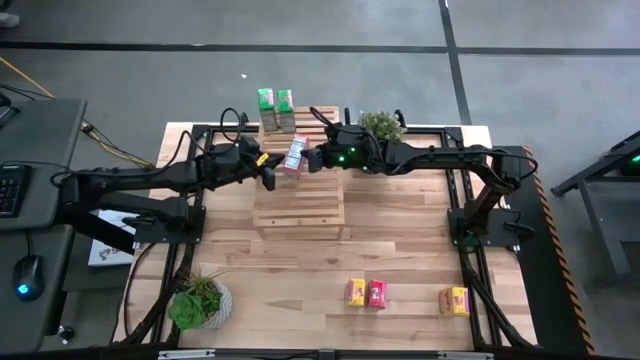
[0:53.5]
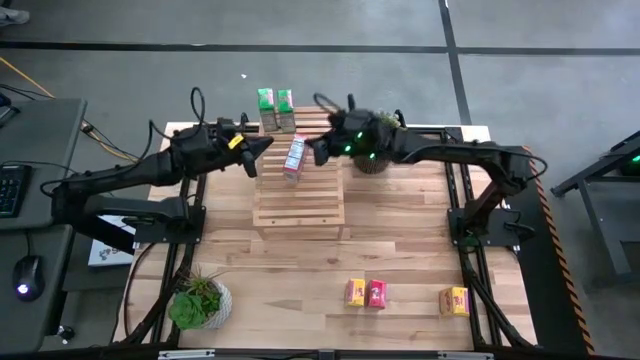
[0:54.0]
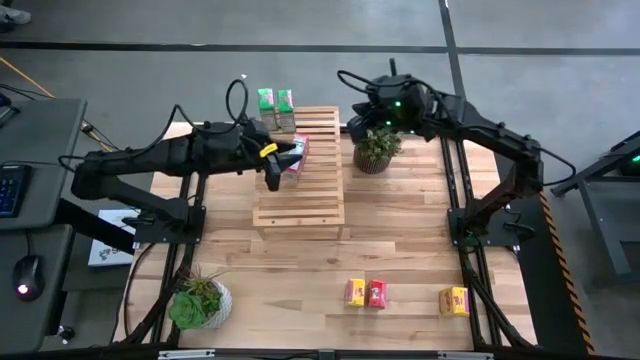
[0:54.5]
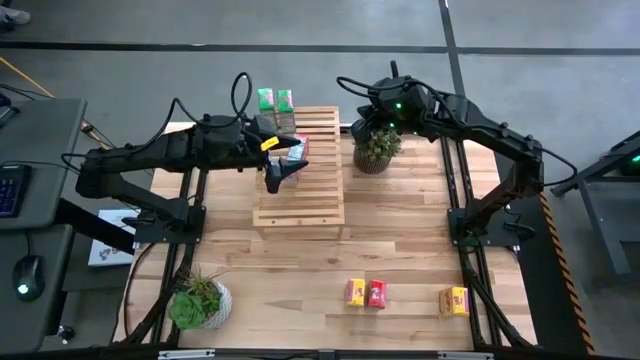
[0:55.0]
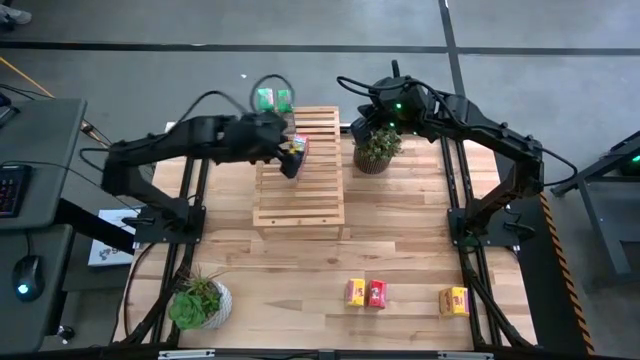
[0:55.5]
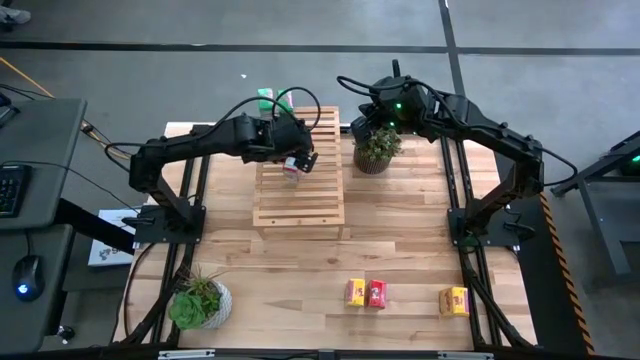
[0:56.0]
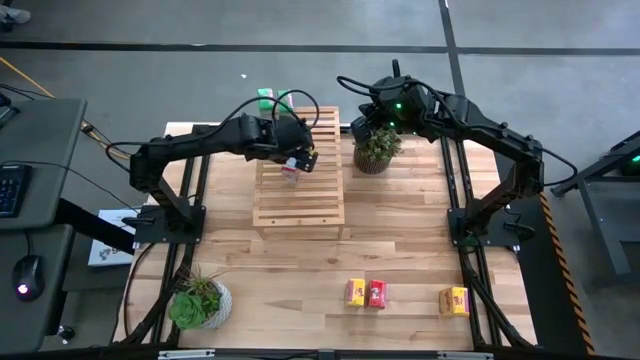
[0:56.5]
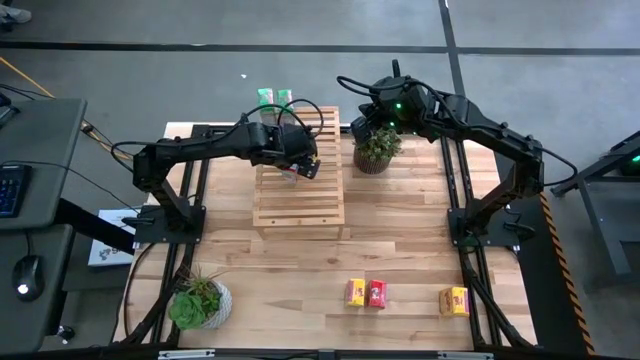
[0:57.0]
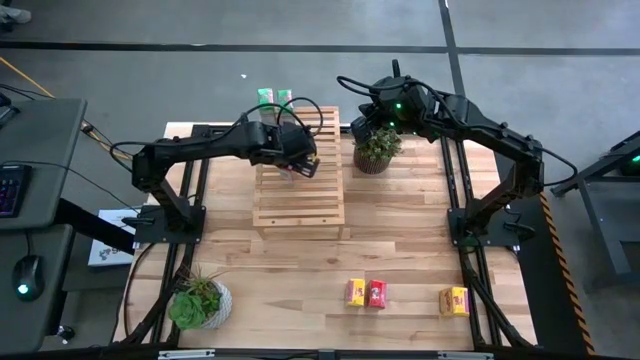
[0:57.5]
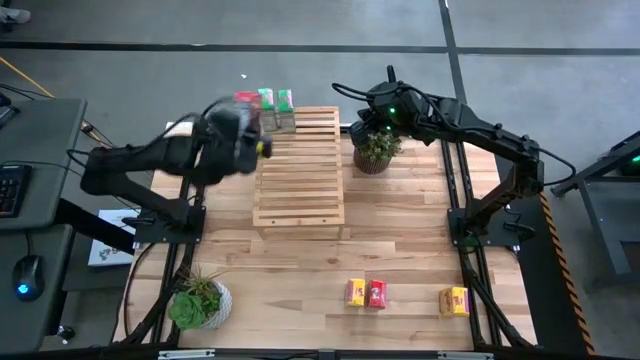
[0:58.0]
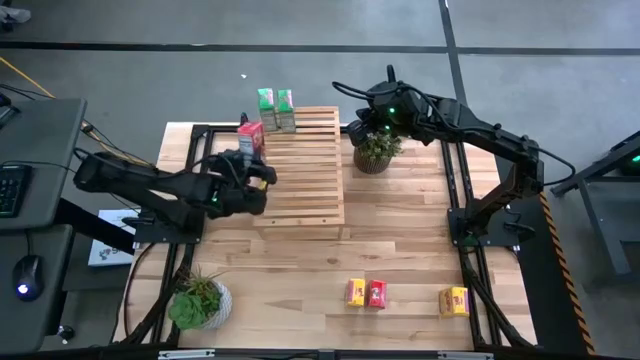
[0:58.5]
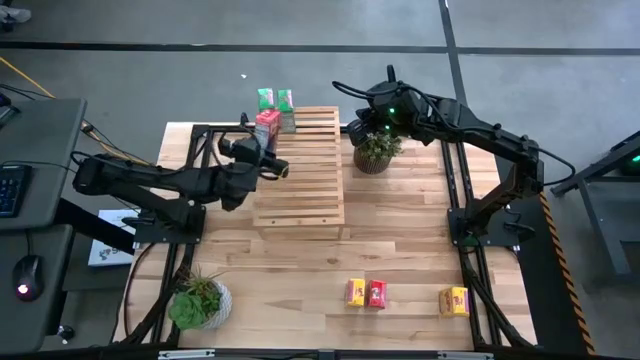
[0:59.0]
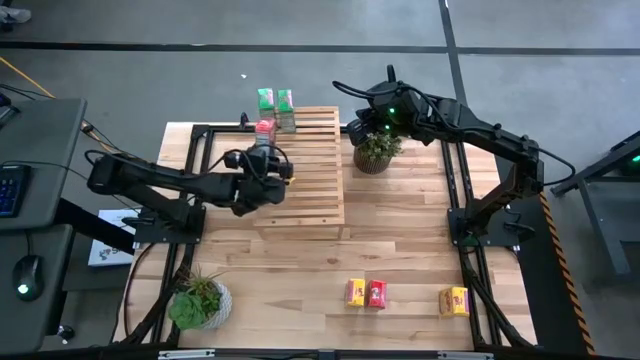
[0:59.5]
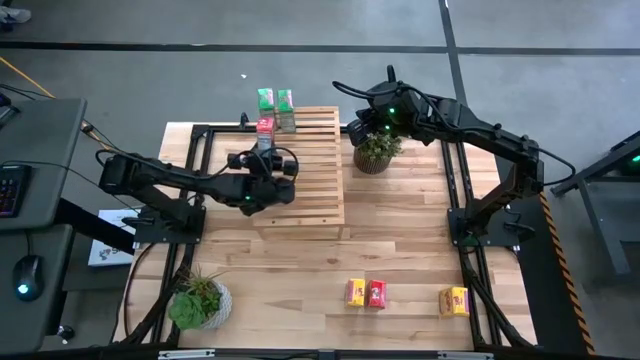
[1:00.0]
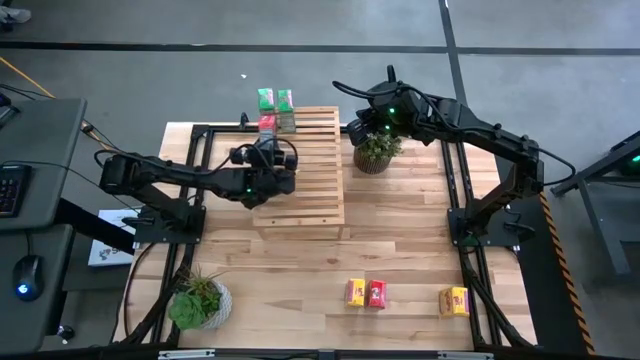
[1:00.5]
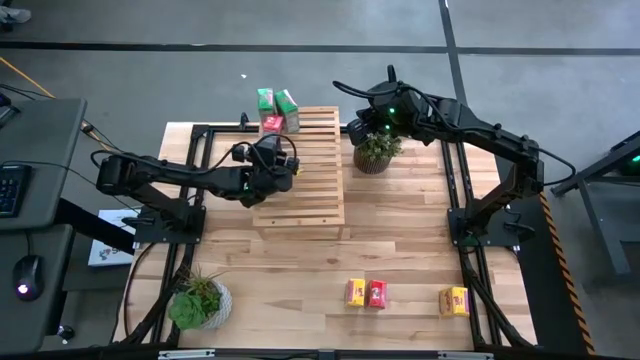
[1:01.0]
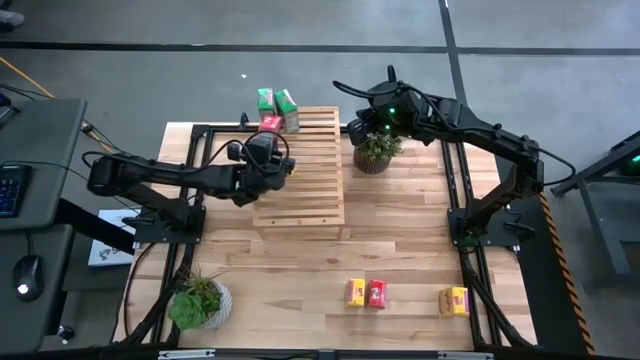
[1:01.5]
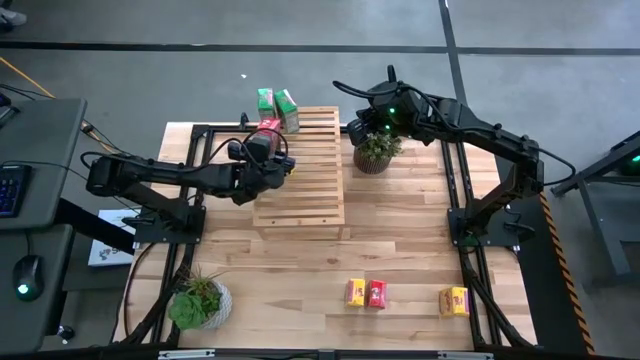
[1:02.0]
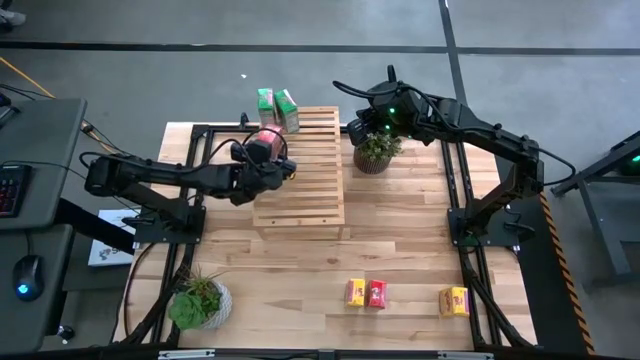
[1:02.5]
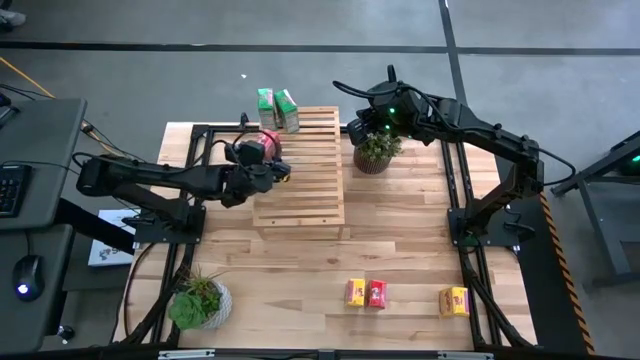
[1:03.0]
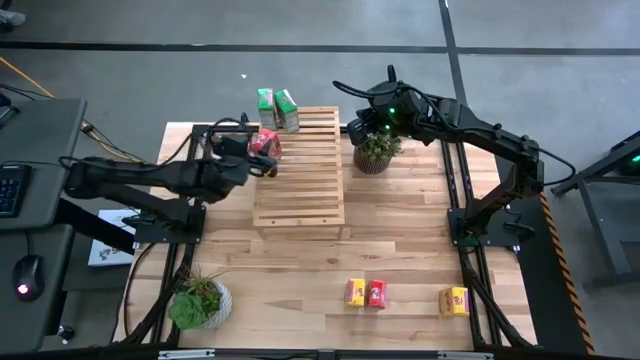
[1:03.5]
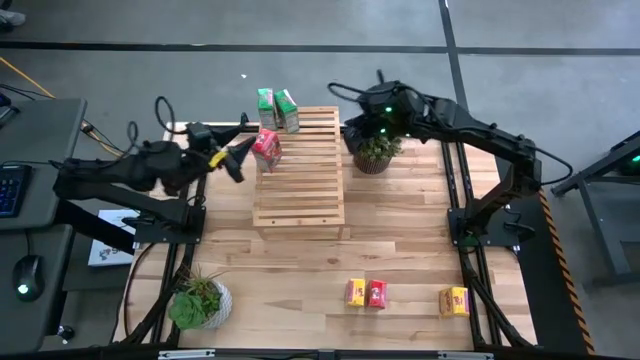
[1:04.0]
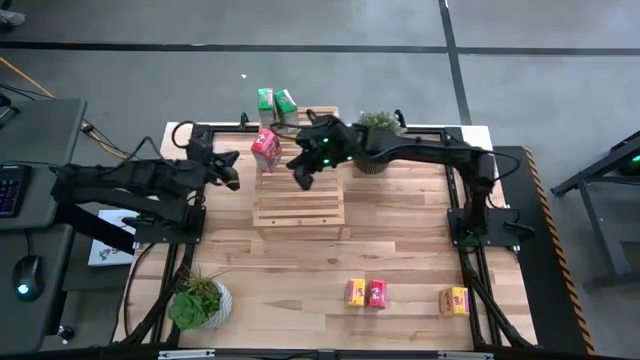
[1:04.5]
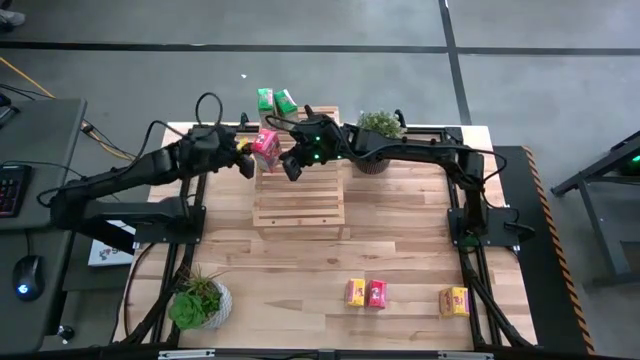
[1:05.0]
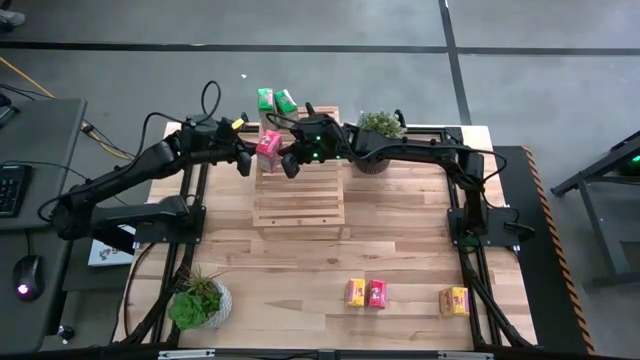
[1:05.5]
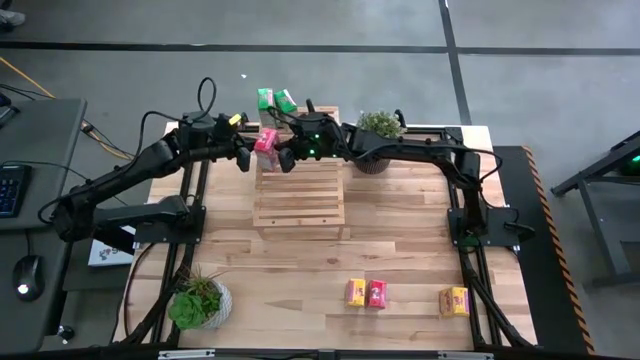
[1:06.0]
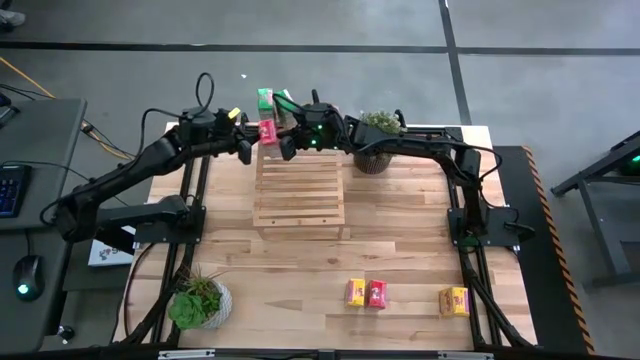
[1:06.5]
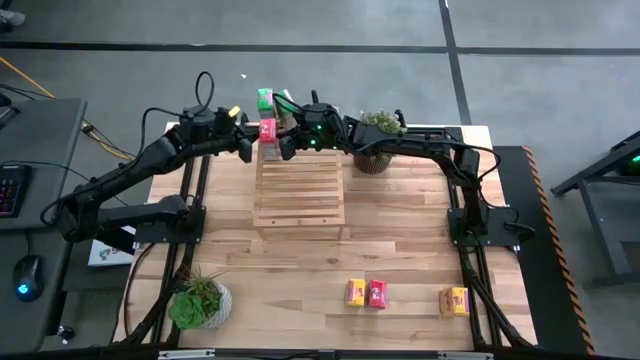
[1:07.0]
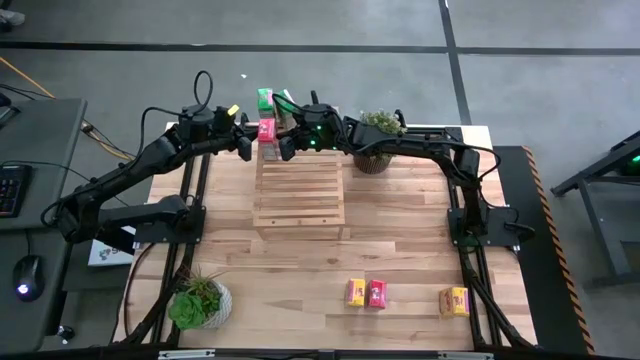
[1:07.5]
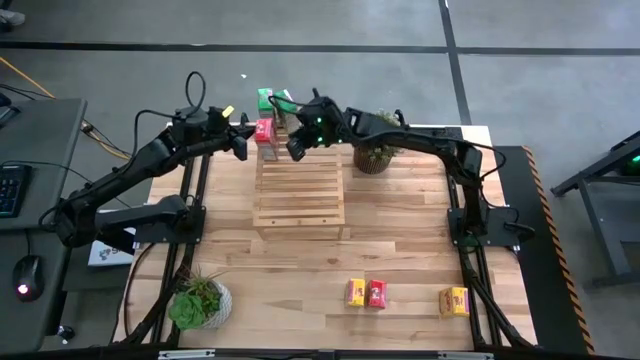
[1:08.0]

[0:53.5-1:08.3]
Task: Stack cereal on shelf
Put the right red cereal box on the shelf

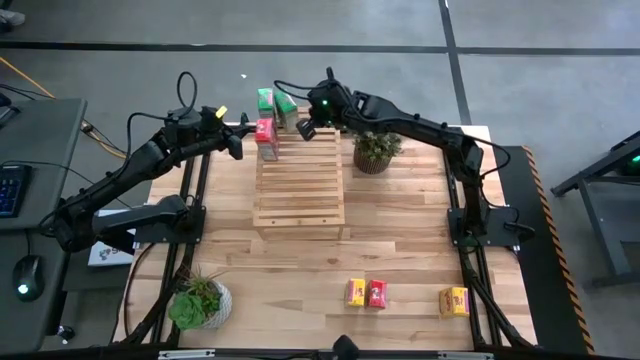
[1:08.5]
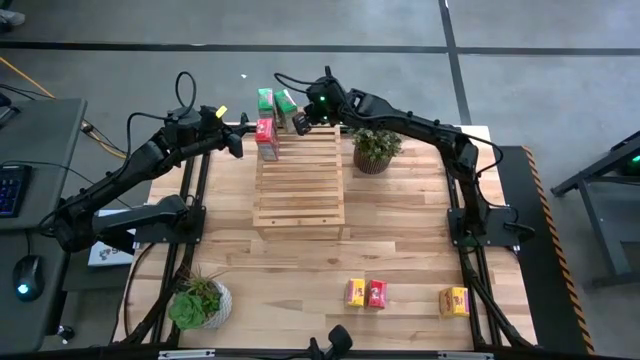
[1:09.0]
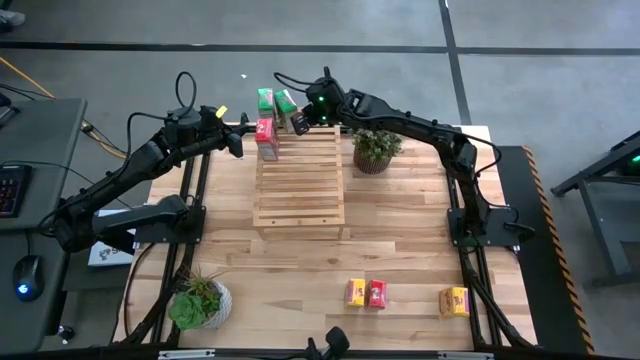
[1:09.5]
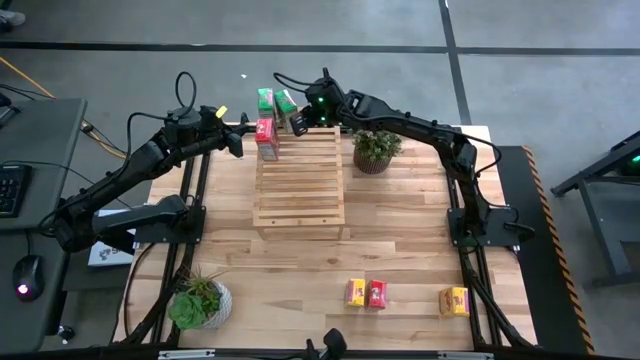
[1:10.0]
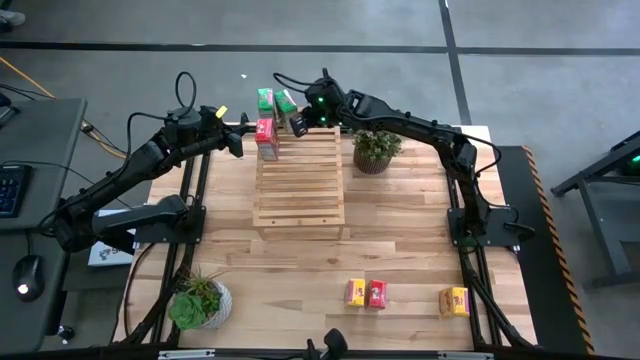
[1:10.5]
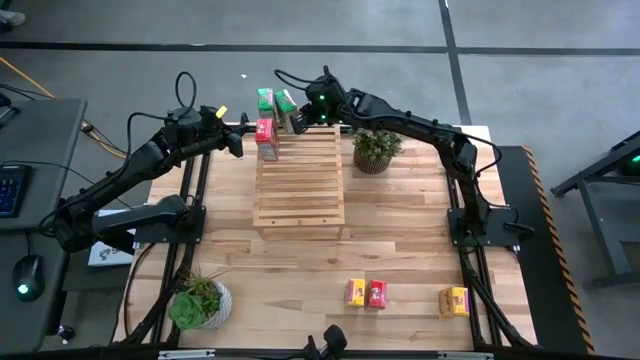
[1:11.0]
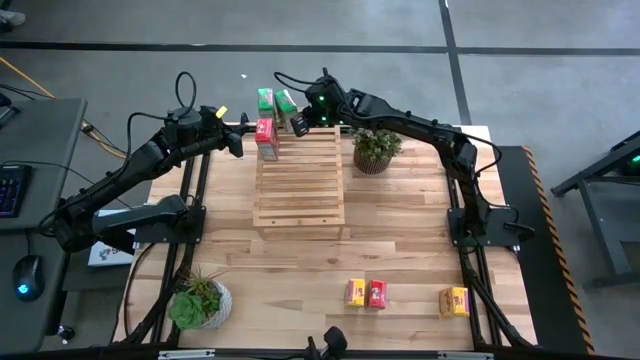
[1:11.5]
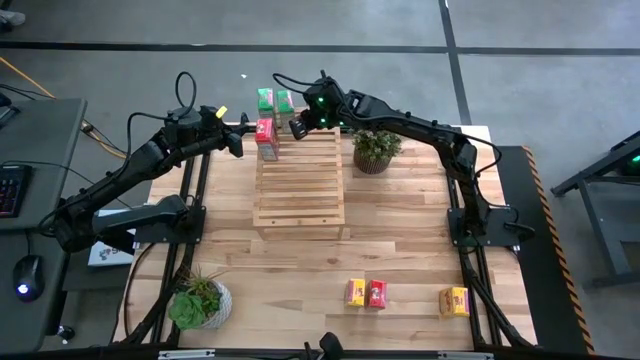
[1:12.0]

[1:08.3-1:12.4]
Adjust the green cereal box

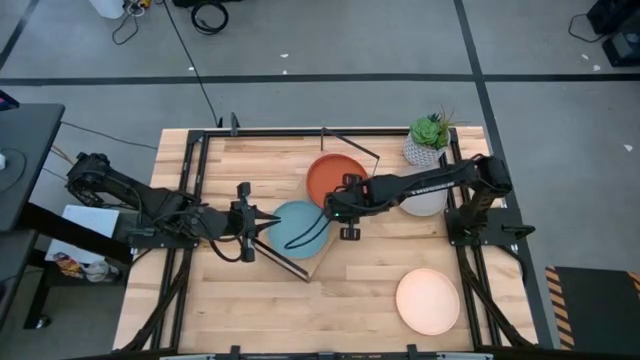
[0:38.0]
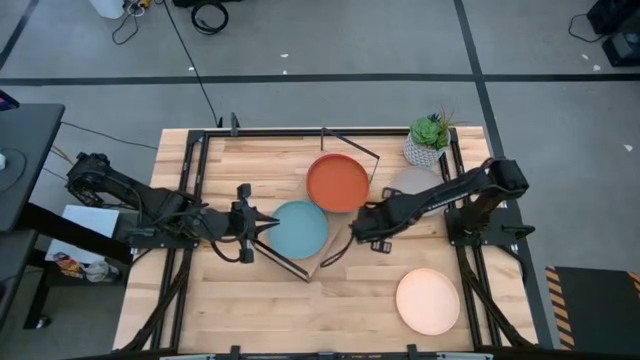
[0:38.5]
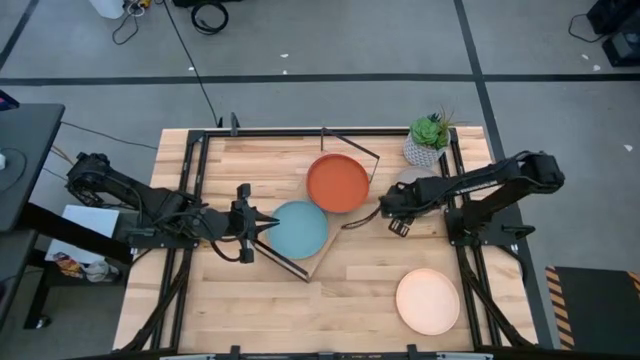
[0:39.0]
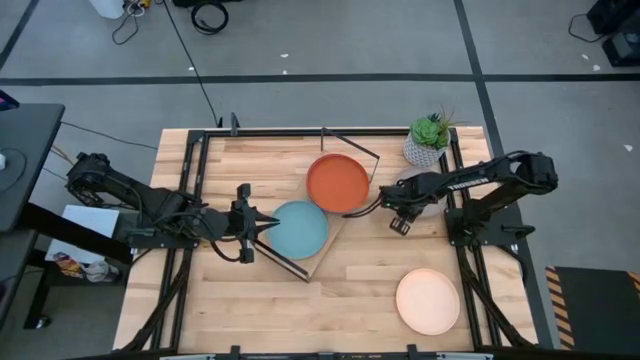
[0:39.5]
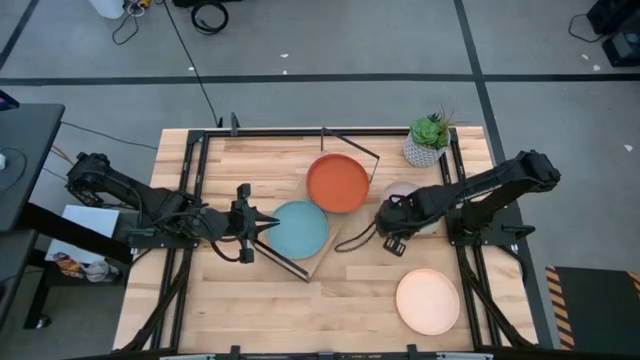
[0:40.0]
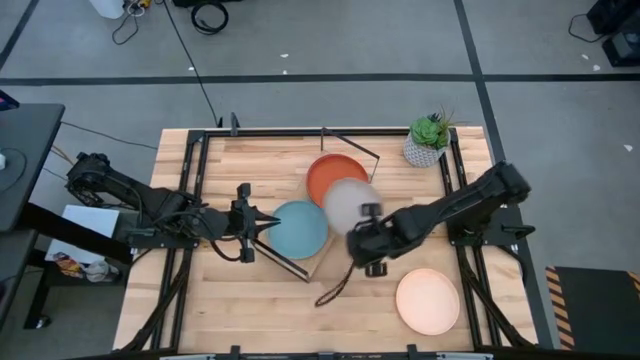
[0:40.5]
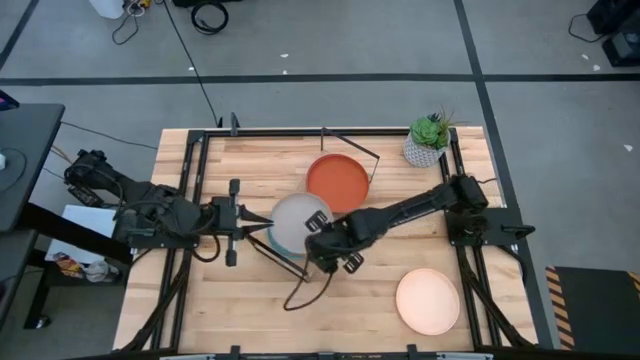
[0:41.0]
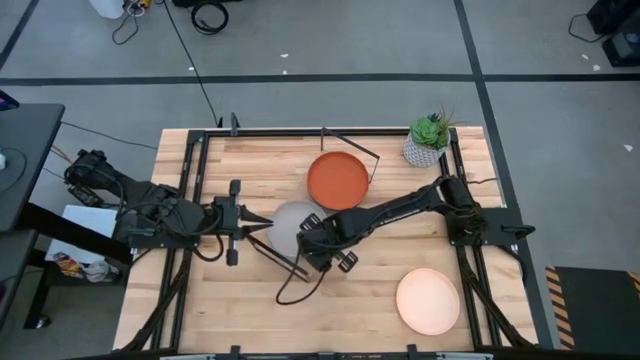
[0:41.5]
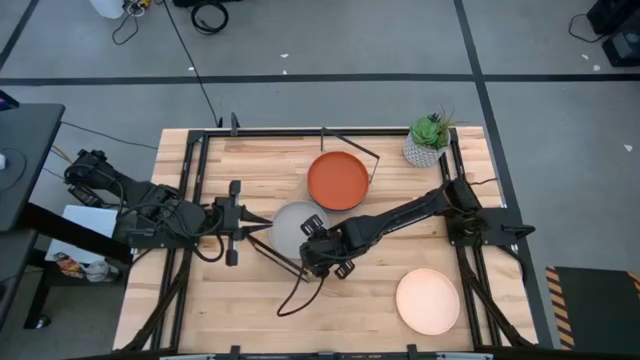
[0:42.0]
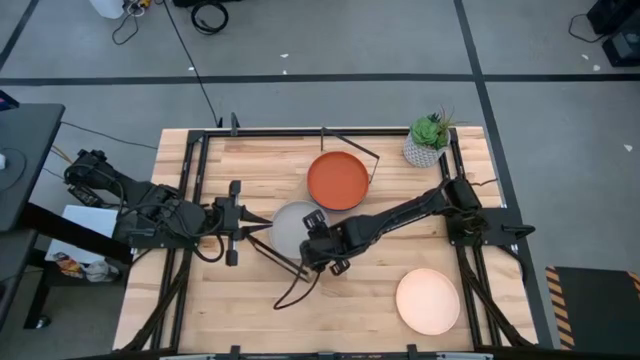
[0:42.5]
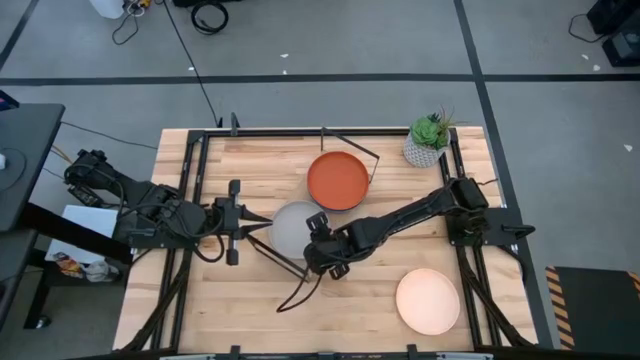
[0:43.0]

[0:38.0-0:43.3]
Task: Place and stack plates onto a shelf
Stack the gray plate on top of the light blue plate on the shelf
